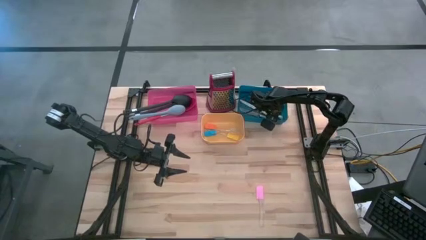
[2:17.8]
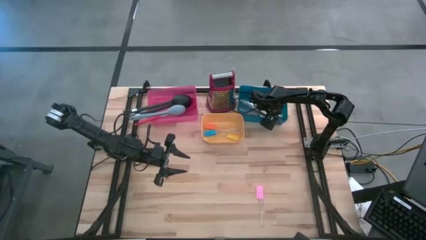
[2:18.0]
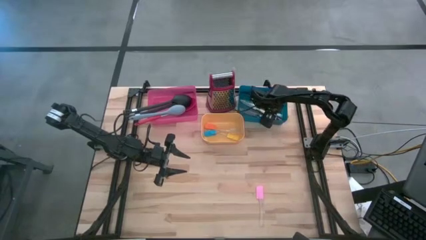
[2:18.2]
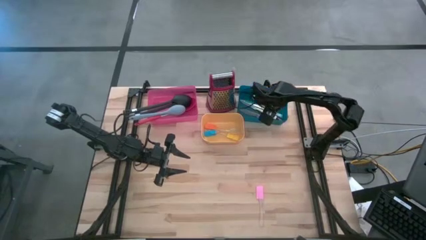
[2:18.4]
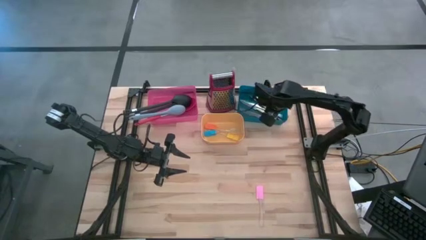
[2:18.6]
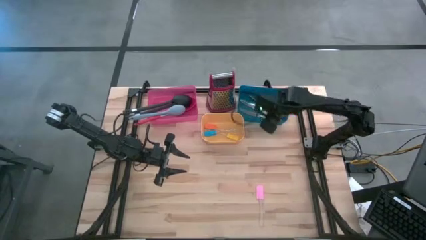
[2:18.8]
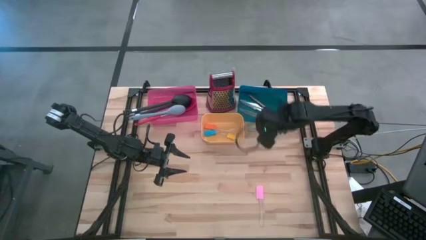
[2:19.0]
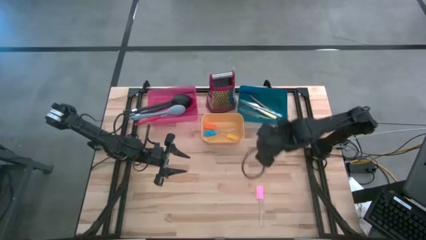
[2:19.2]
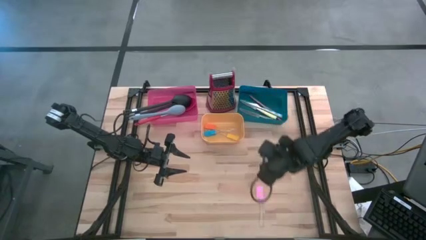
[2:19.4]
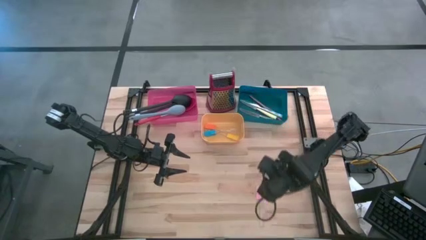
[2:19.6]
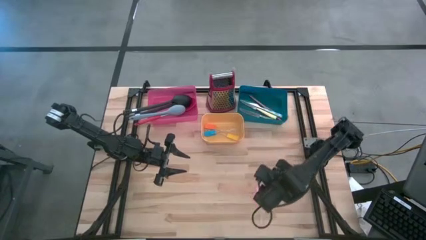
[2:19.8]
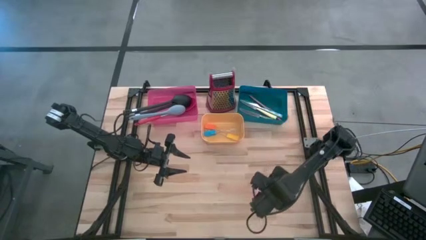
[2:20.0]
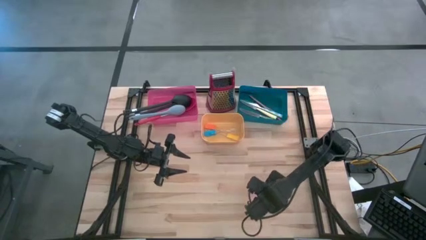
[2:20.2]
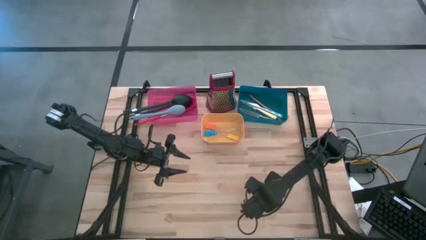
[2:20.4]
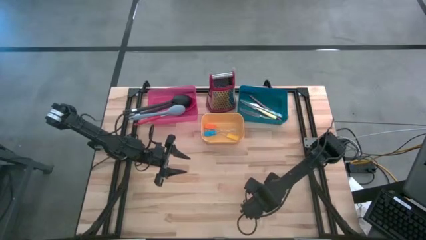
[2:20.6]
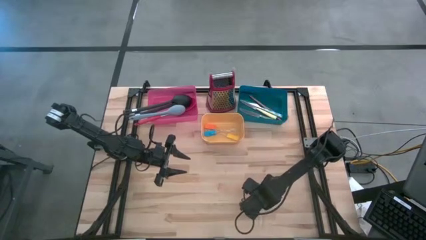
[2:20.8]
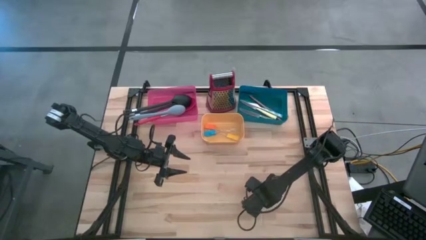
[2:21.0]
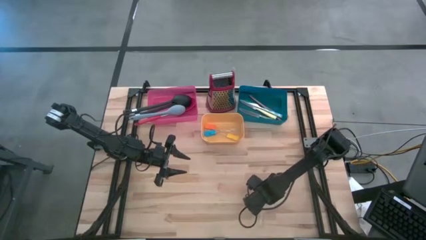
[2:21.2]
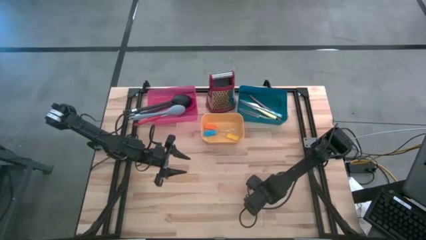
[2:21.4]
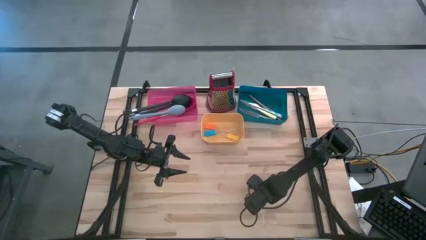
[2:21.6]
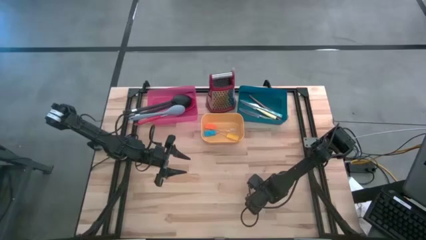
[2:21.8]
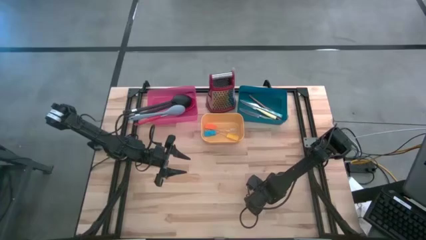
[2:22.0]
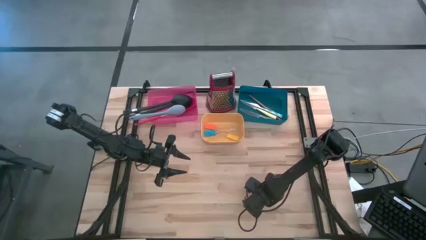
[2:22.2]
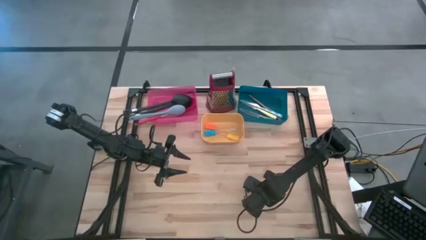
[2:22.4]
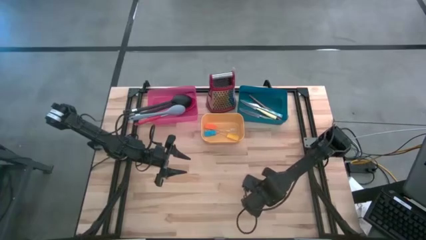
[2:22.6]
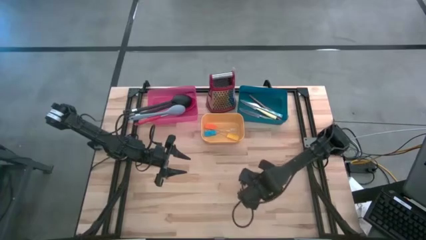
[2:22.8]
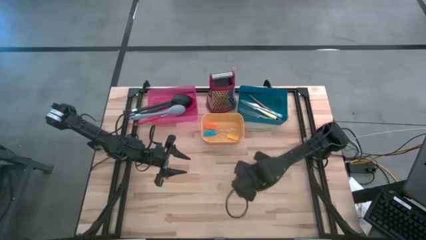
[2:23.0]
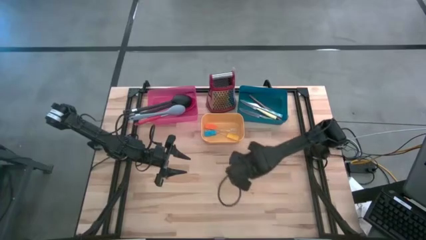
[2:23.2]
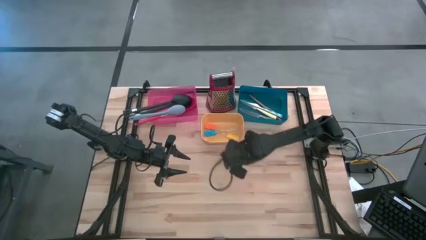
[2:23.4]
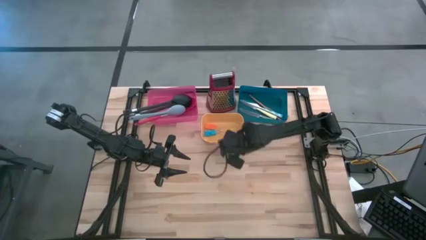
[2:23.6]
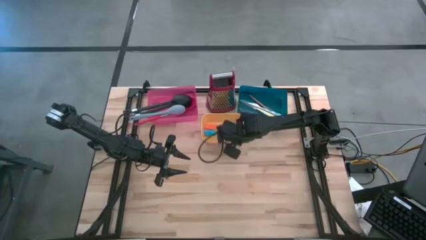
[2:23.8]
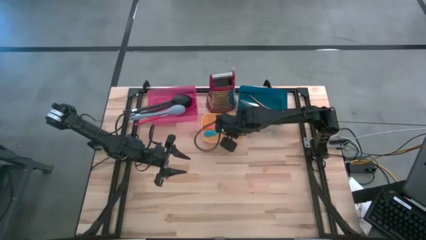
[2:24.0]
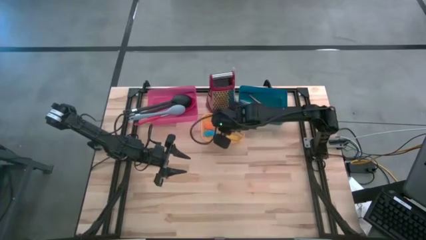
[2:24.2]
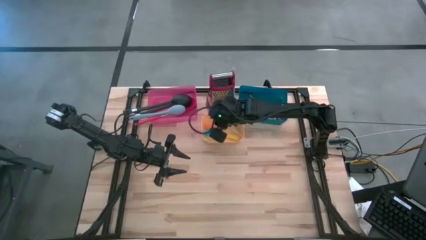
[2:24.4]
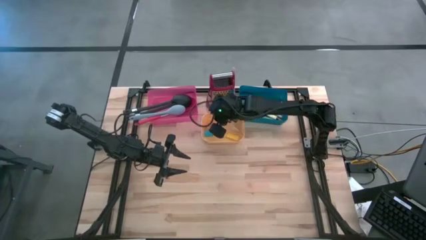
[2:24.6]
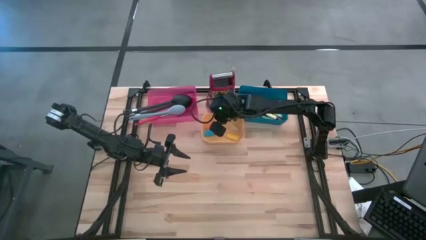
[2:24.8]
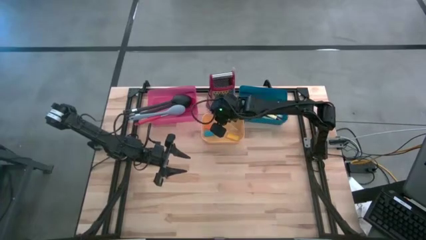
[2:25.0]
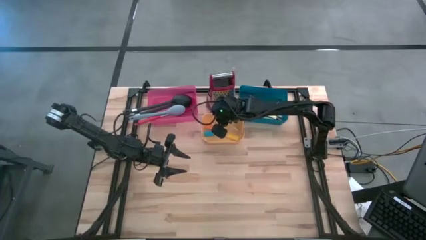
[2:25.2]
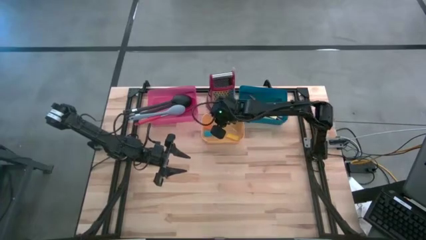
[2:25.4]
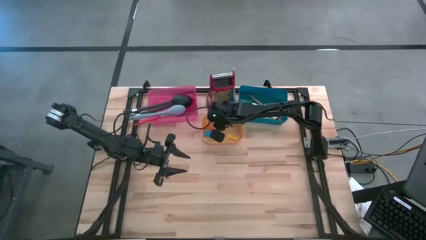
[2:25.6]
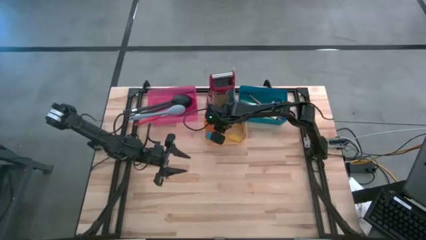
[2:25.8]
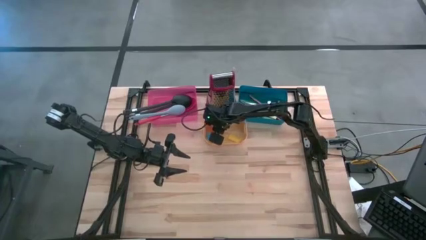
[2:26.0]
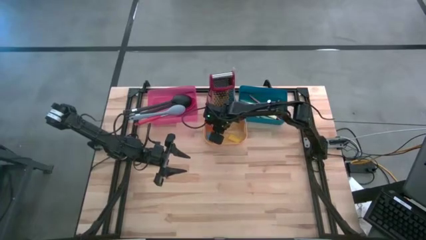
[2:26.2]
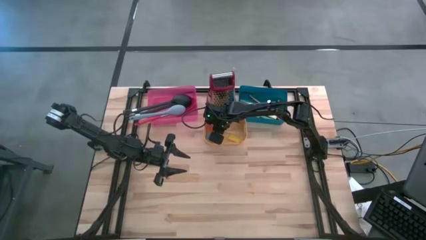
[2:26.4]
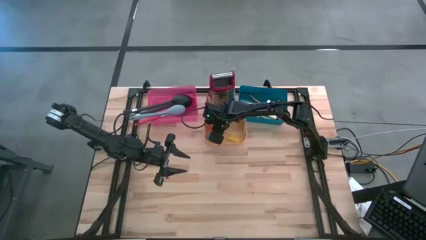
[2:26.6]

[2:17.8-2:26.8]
Task: Pick & Place Kitchen Items
Put the pink spatula into the yellow bin

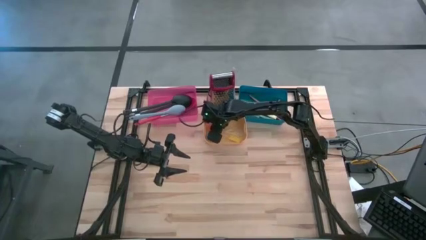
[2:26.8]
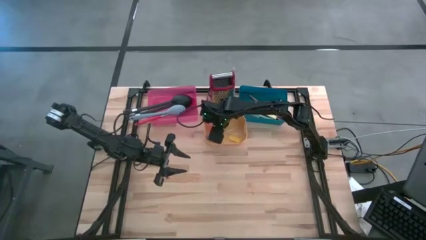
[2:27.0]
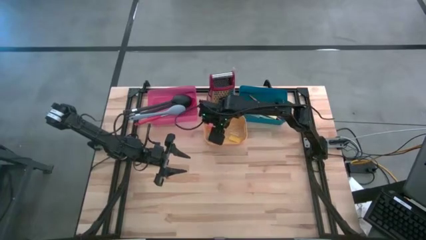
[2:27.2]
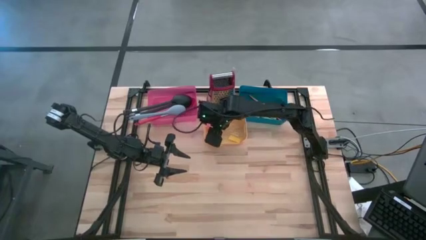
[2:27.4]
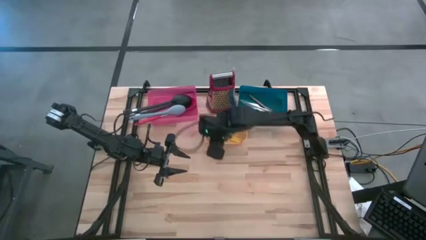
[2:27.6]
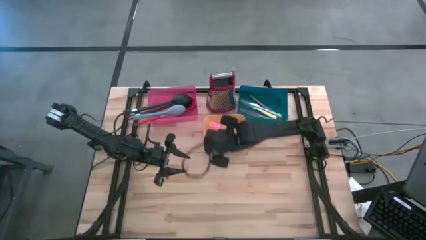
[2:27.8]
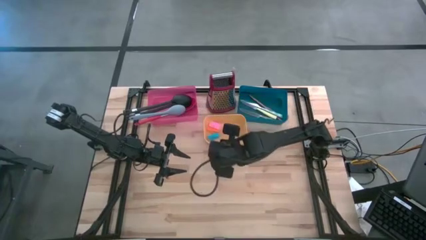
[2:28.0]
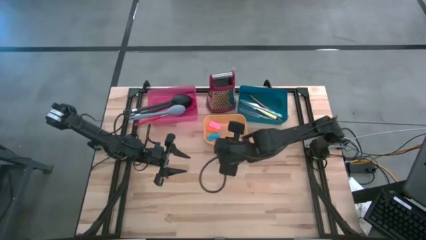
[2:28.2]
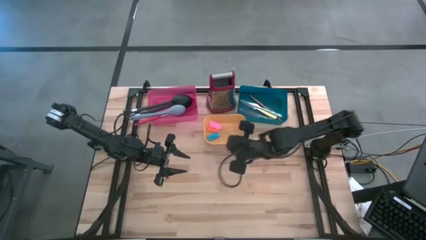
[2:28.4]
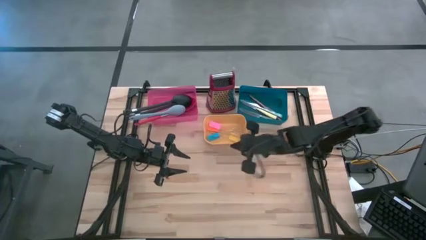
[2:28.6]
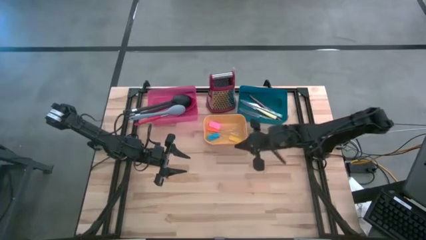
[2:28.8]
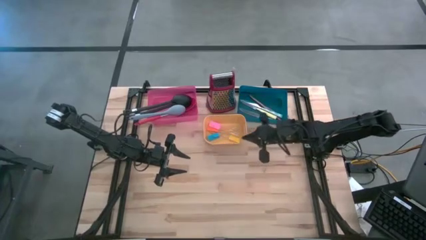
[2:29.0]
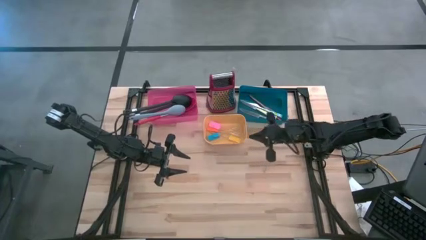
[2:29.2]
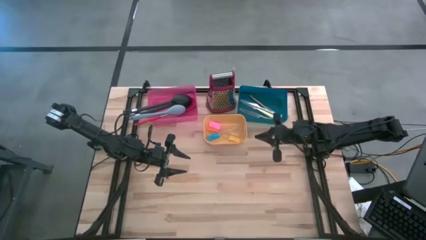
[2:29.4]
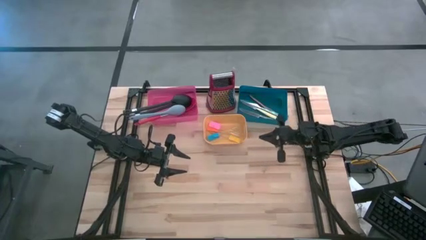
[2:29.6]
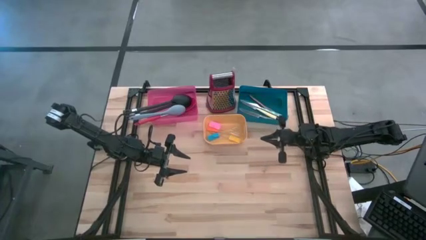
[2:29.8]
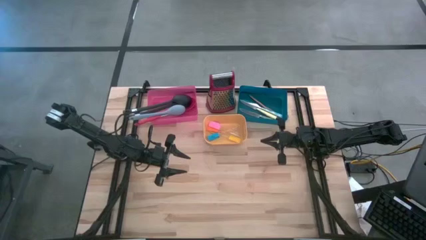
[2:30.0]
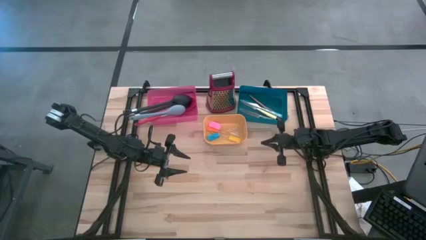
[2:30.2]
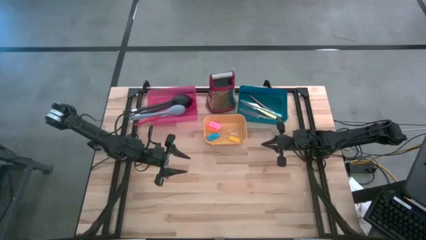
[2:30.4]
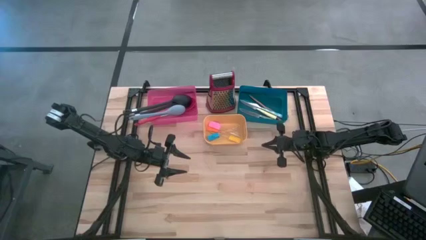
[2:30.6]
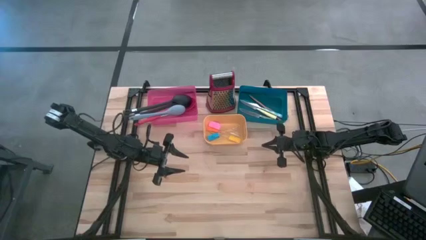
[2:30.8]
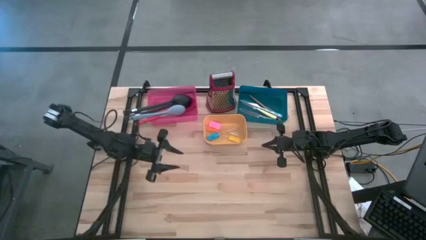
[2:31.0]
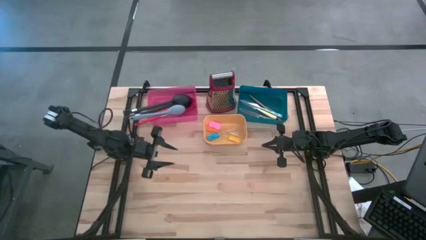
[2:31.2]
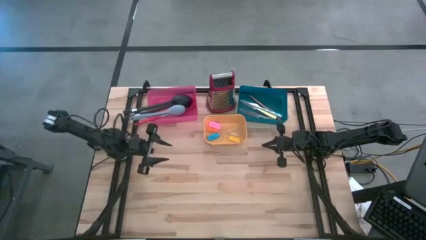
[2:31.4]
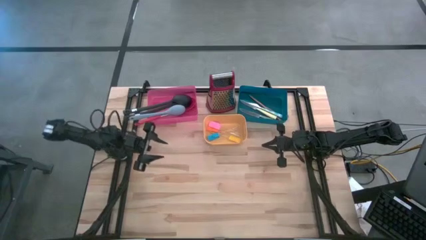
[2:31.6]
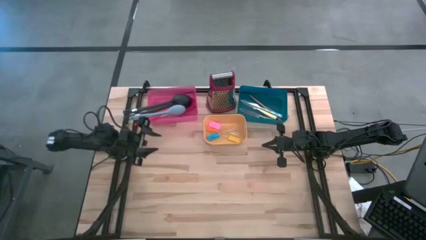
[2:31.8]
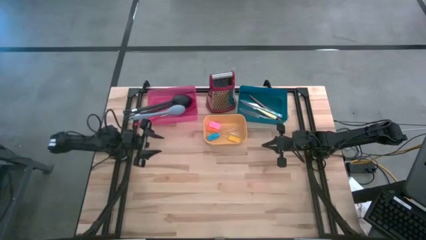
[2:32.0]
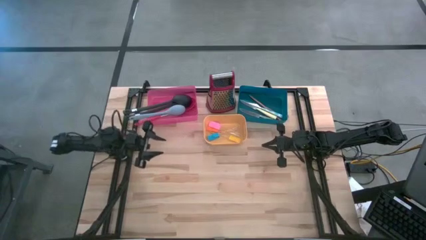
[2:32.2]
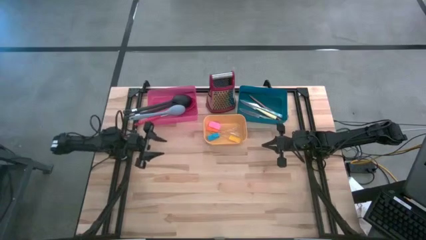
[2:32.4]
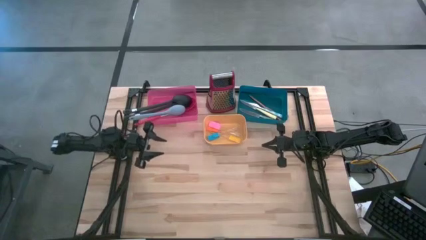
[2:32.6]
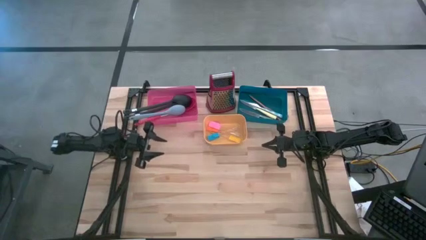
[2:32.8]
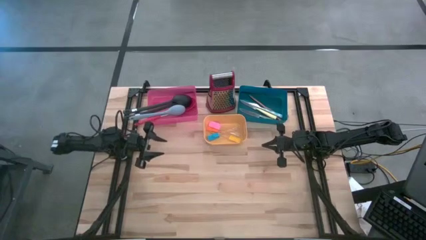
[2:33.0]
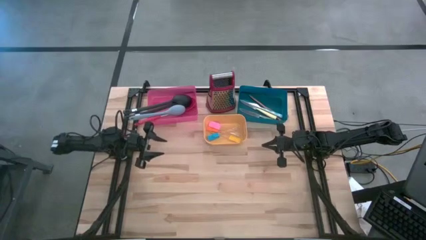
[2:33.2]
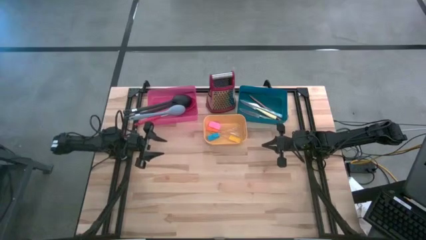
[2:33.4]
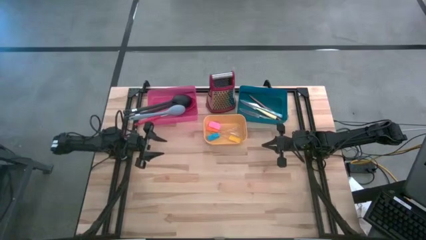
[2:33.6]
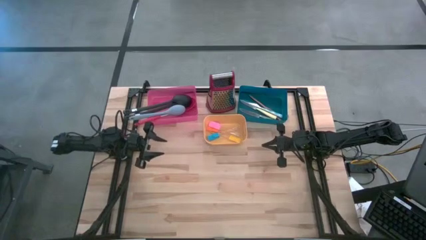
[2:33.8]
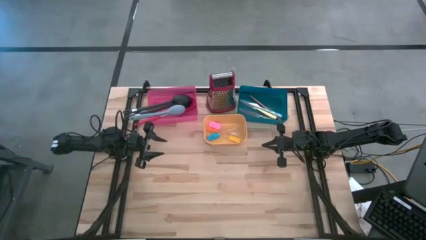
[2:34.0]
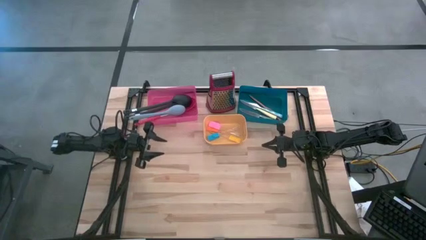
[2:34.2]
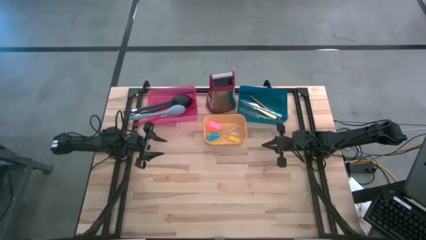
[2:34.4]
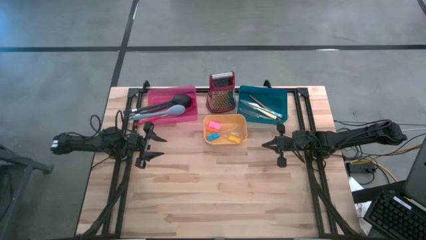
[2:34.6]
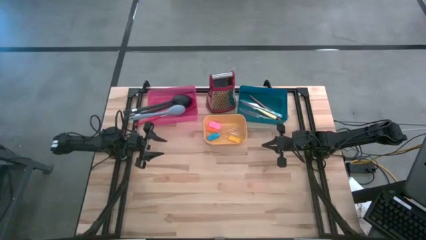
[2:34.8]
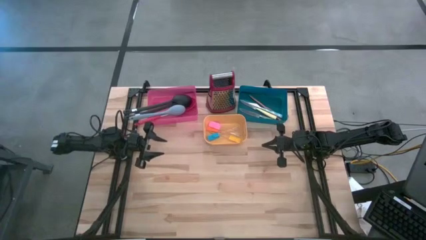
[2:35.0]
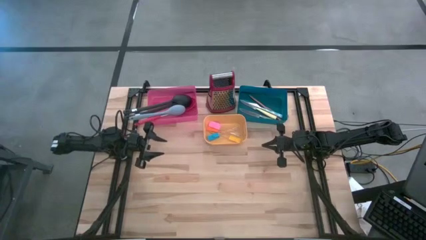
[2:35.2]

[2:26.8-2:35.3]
Return to Home Position
